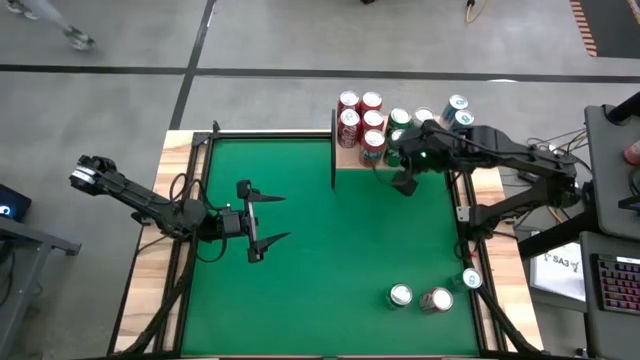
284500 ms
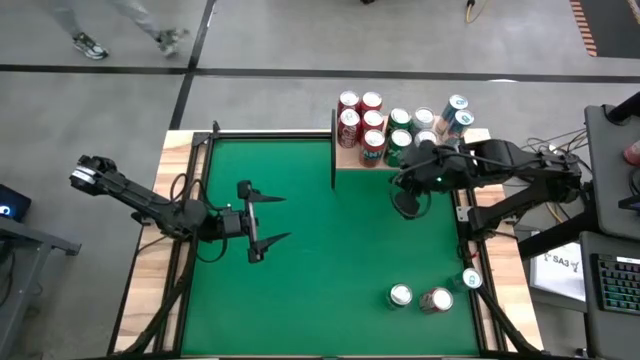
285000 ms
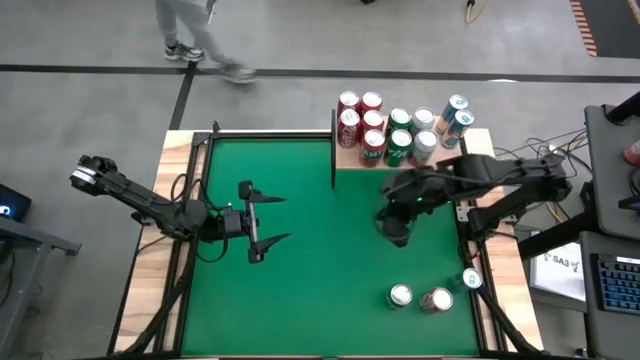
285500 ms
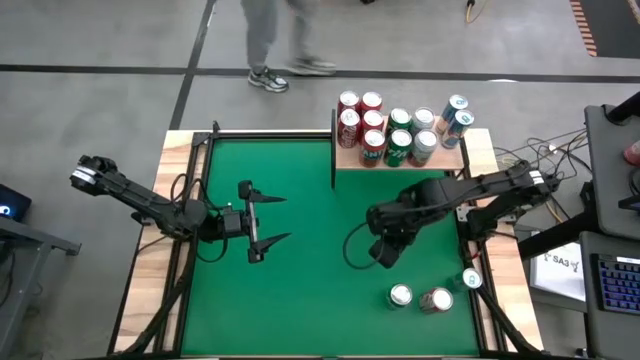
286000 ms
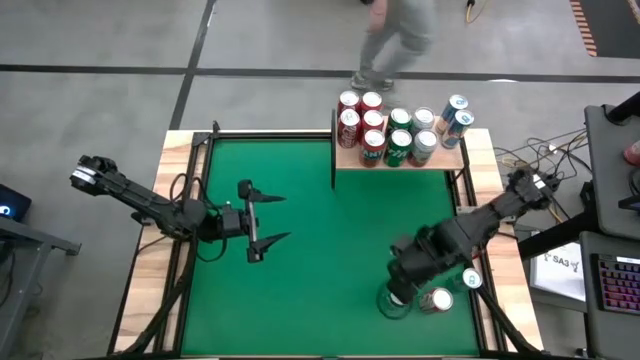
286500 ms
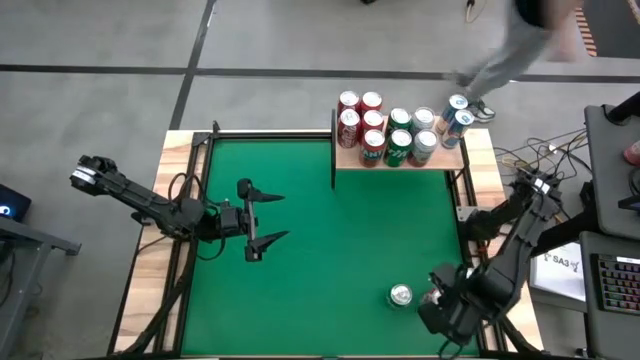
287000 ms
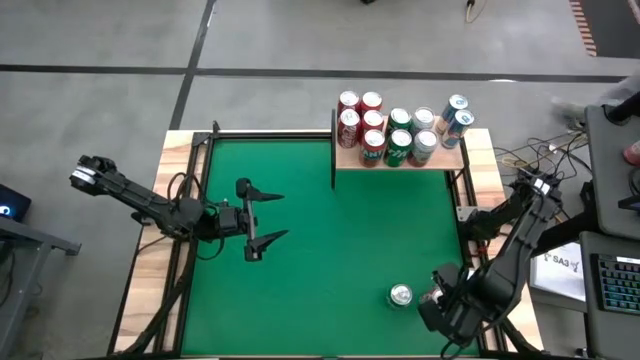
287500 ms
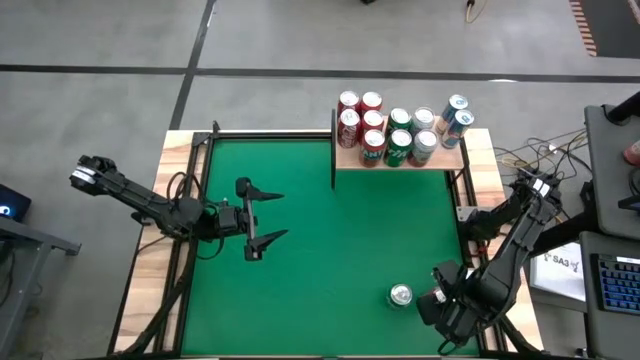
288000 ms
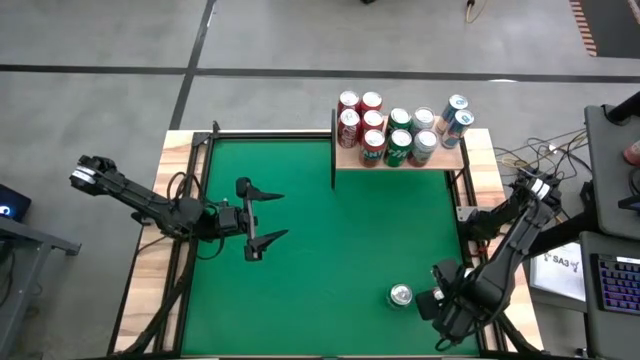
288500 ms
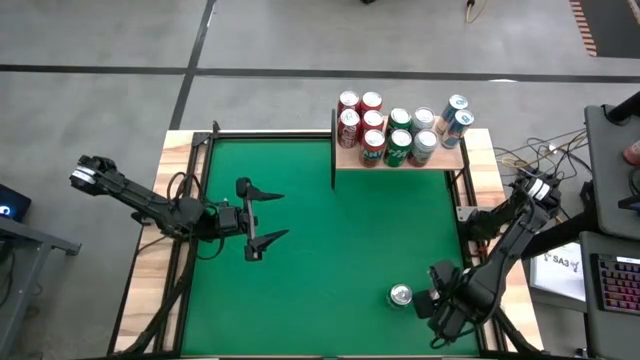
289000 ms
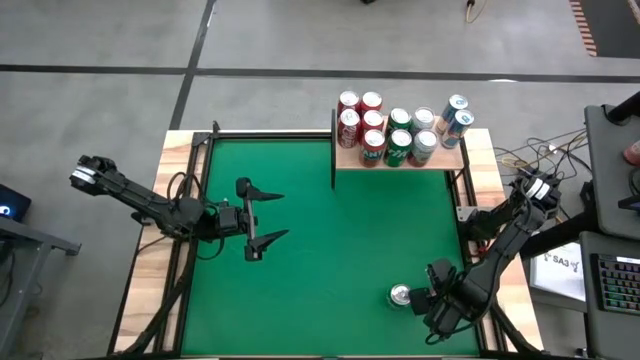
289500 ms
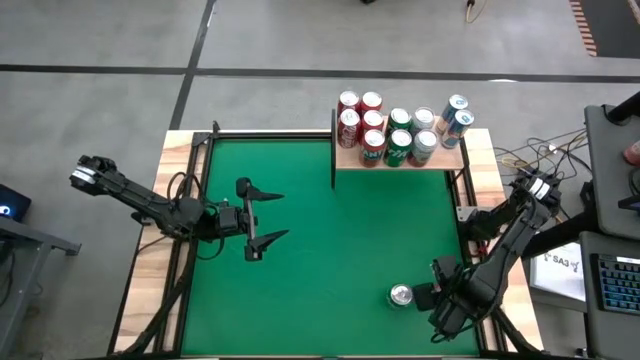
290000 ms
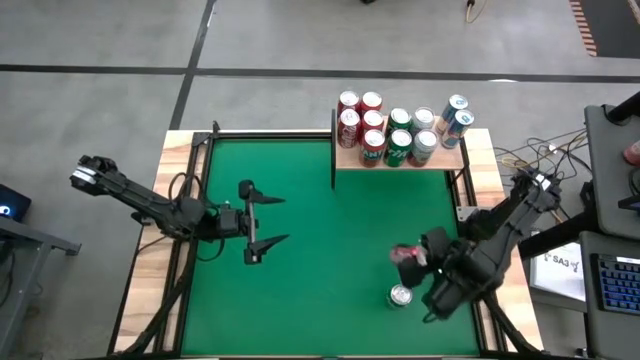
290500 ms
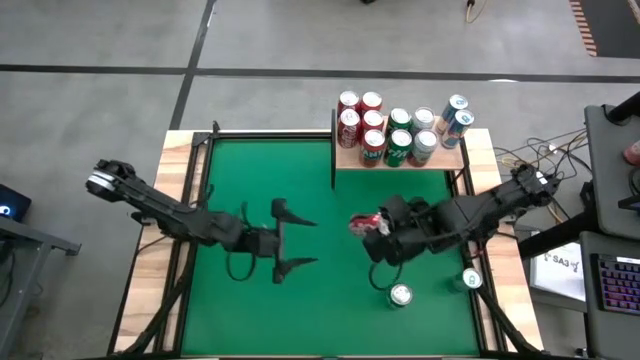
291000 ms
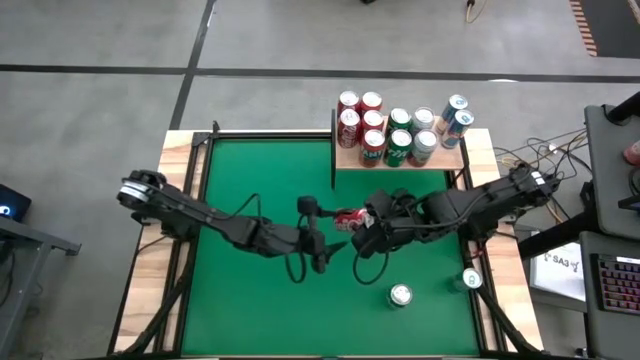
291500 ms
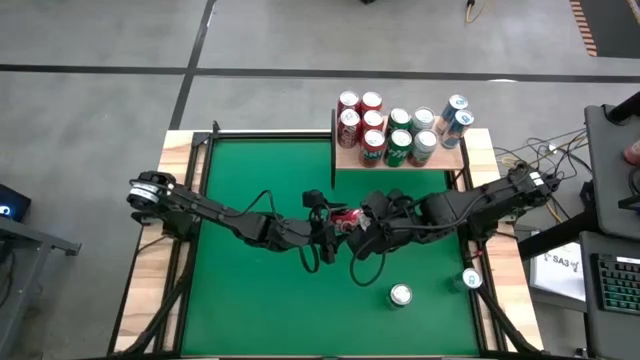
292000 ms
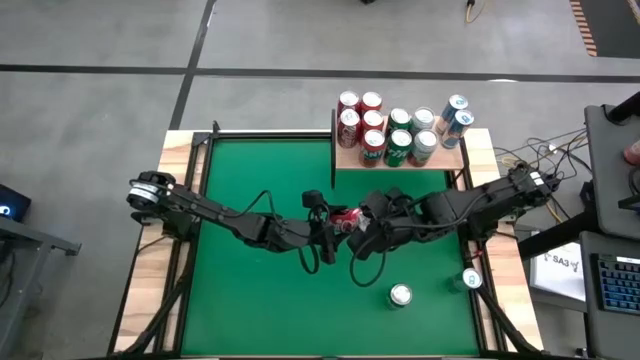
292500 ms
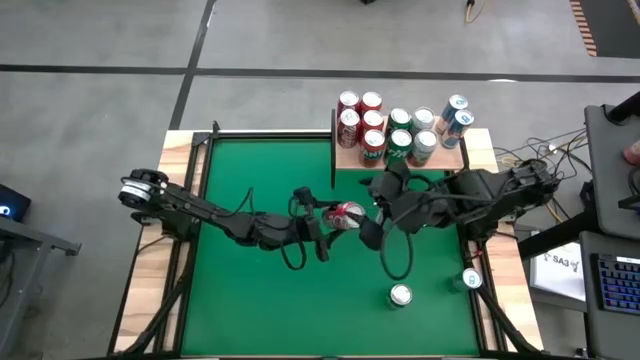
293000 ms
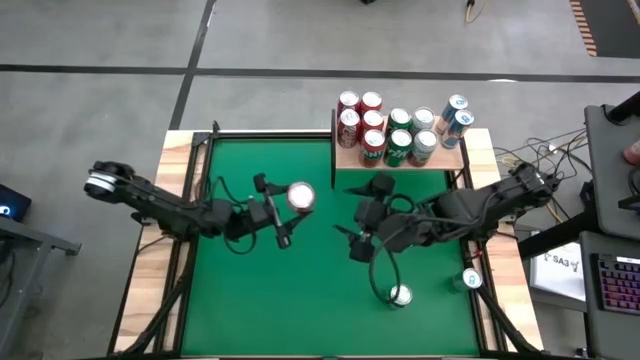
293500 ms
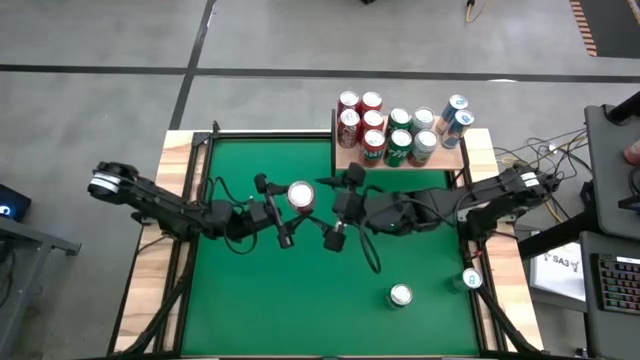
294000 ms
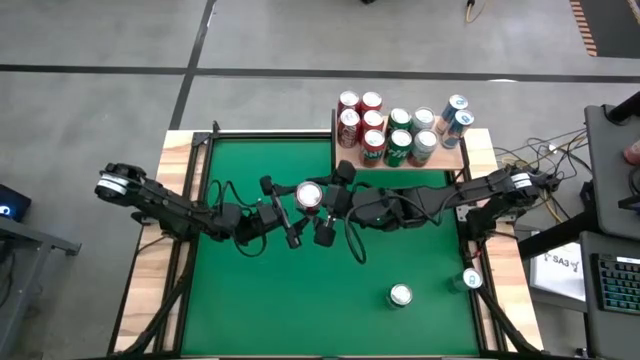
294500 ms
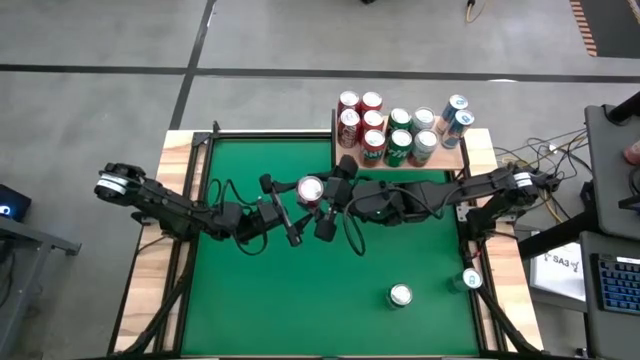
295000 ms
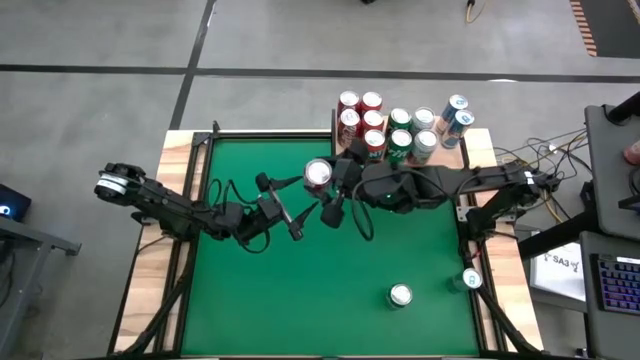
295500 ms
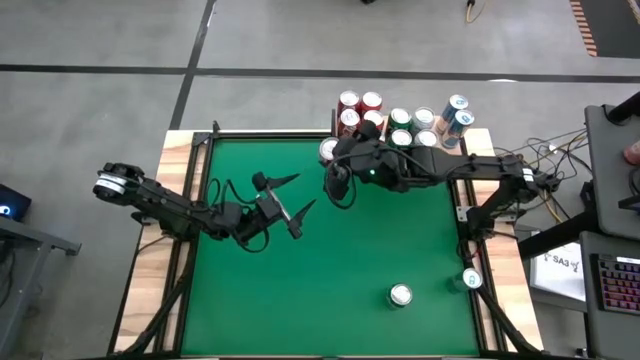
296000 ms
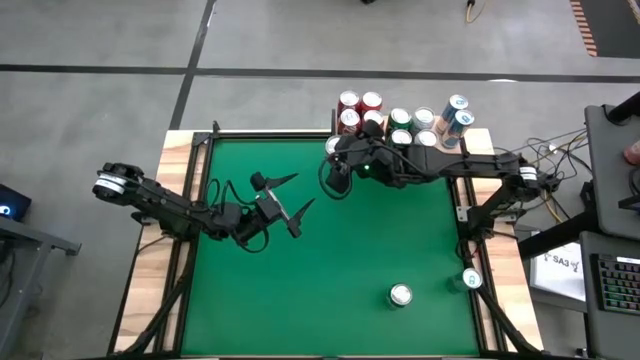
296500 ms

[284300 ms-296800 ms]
Task: Place canned beverage on shelf
Put the red-white soda can on the shelf aligned with the other red-white soda cans

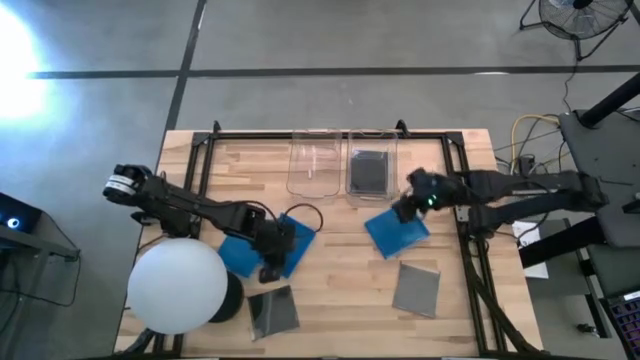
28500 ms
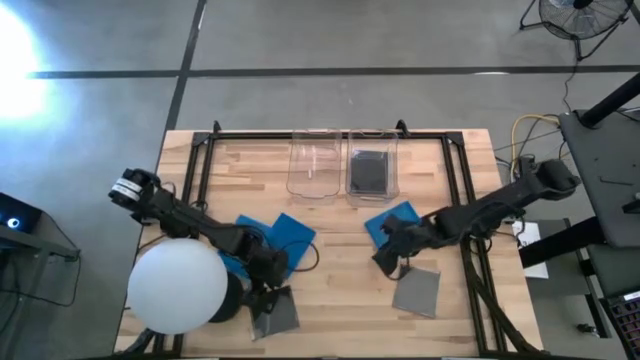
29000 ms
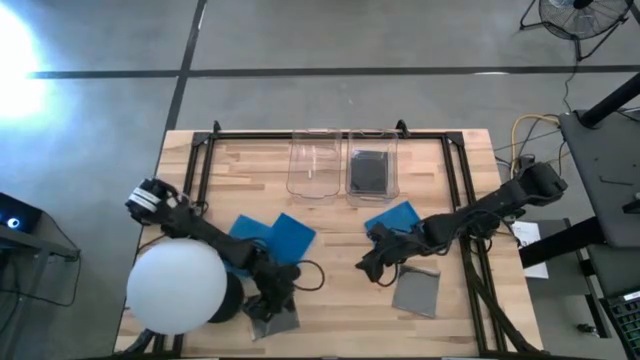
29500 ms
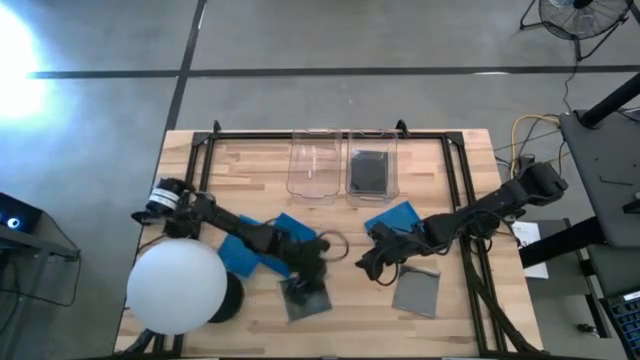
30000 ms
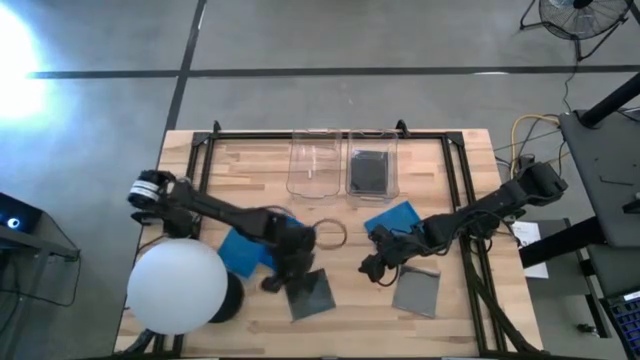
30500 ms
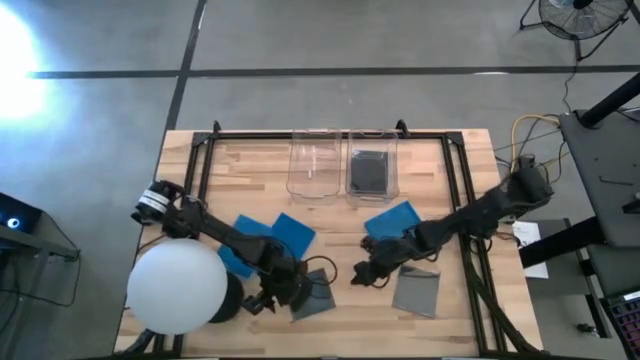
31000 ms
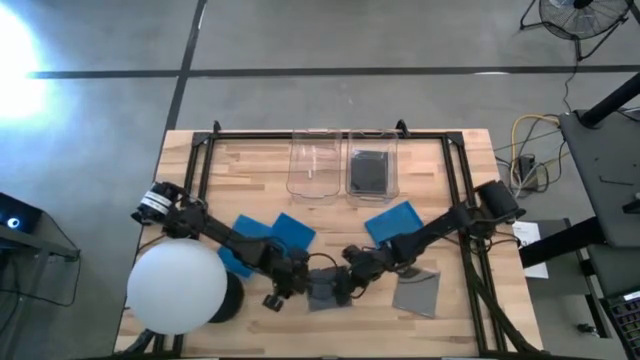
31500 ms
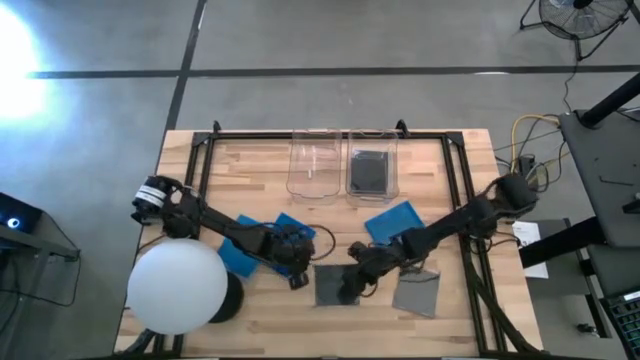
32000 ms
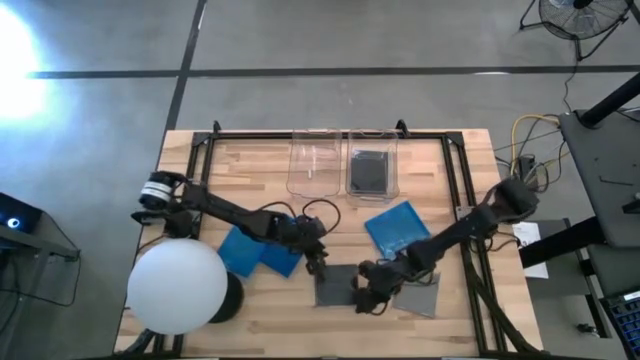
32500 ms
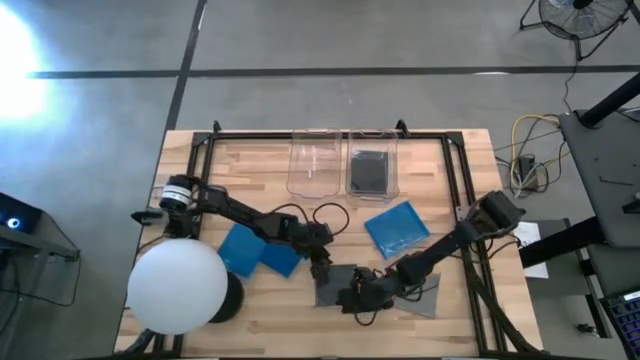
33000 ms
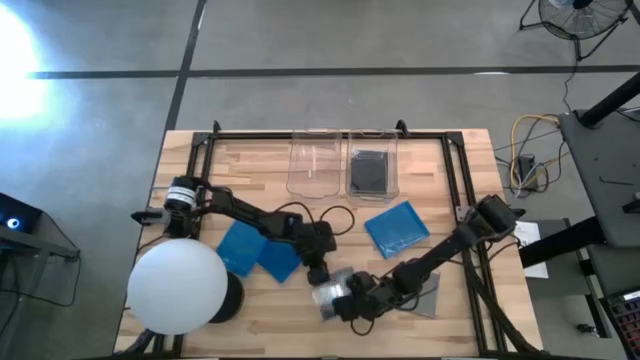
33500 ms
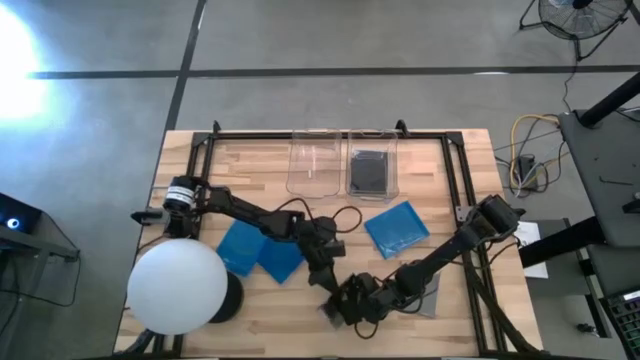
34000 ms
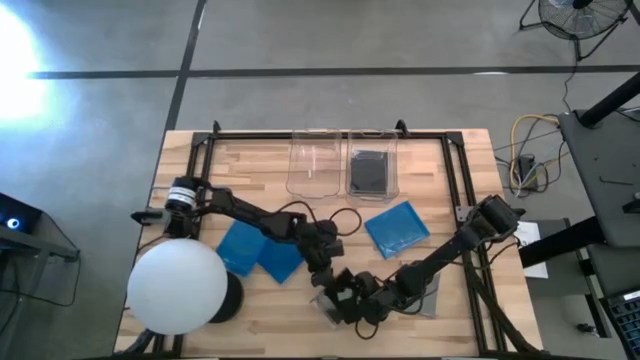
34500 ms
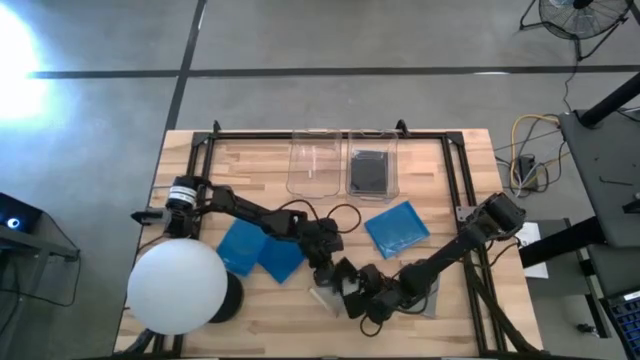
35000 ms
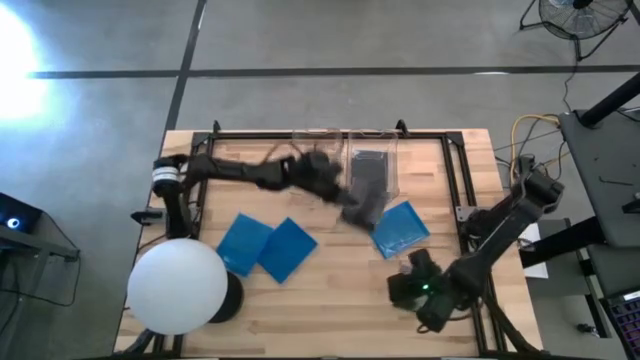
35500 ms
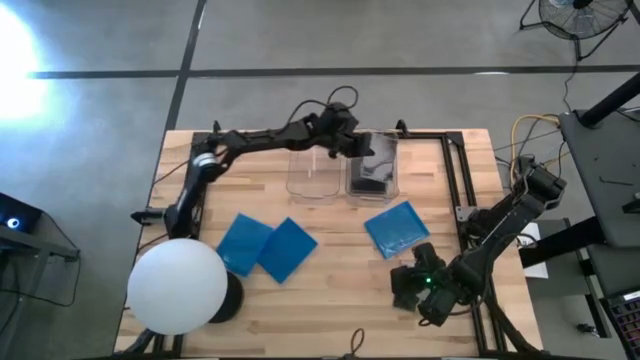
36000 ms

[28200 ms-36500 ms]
Task: Pick & place jewel cases by type
Put the black CD case into the right transparent bin

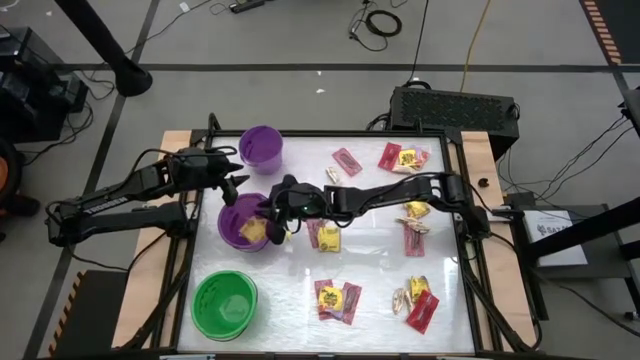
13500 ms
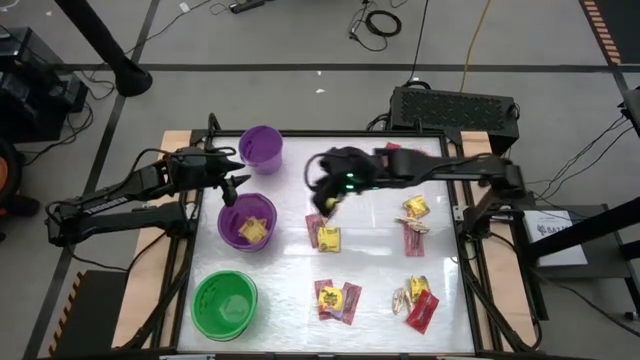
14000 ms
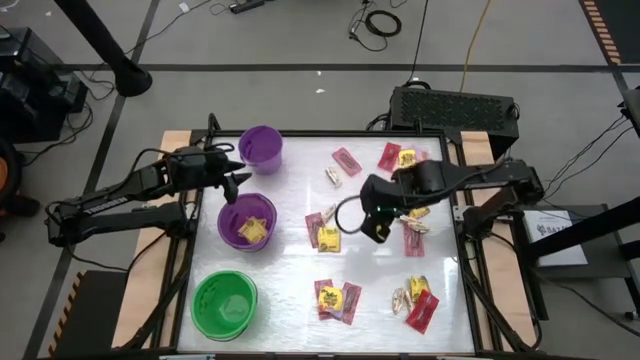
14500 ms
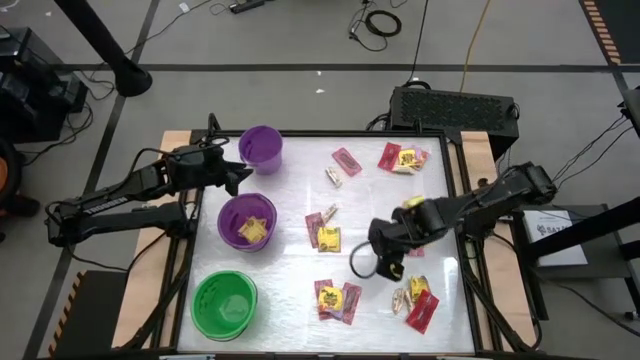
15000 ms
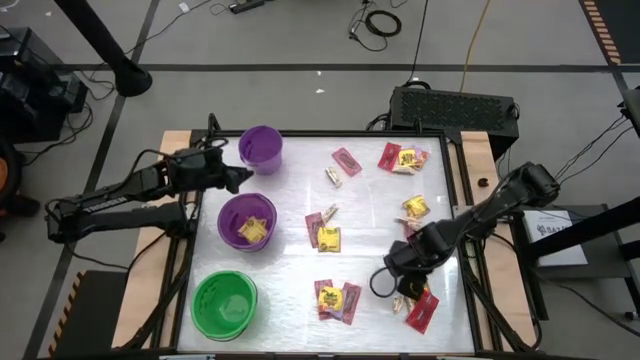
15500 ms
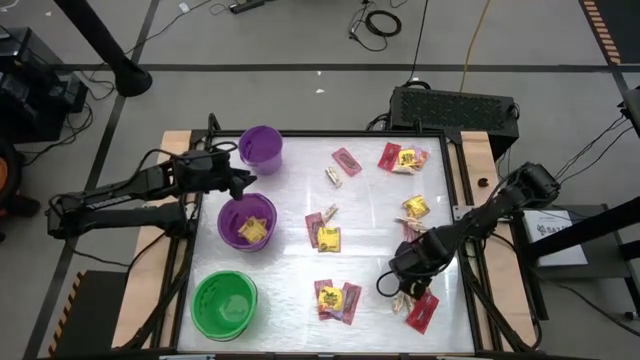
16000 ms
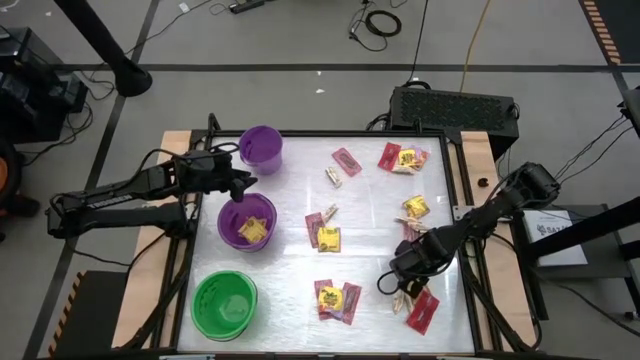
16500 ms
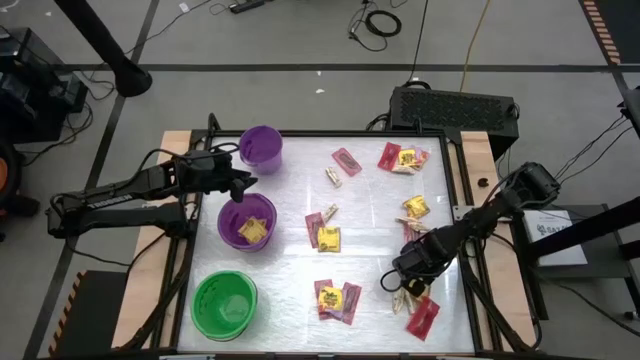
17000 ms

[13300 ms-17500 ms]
Task: Sort candy by brand, put in halloween buckets
Put the yellow candy into the bottom purple bucket
